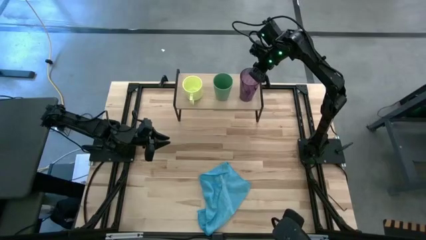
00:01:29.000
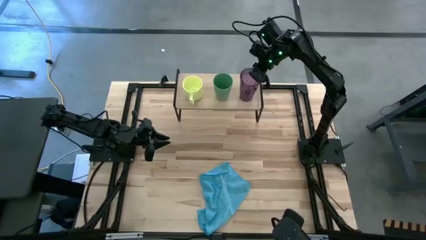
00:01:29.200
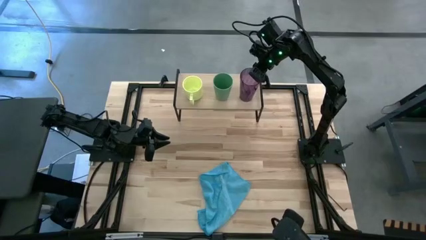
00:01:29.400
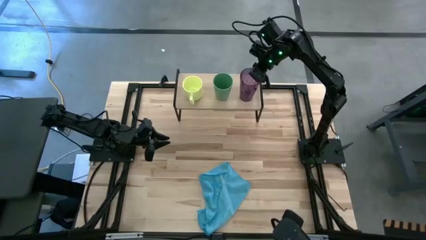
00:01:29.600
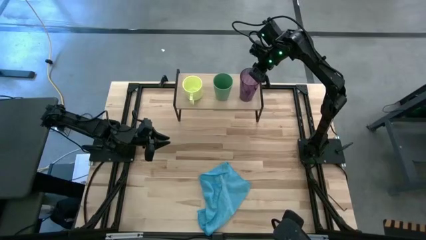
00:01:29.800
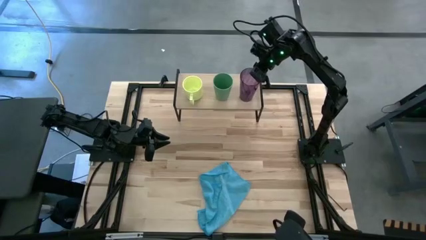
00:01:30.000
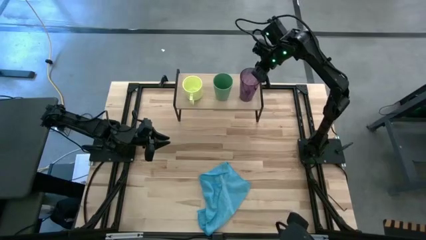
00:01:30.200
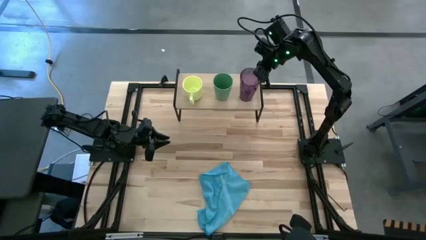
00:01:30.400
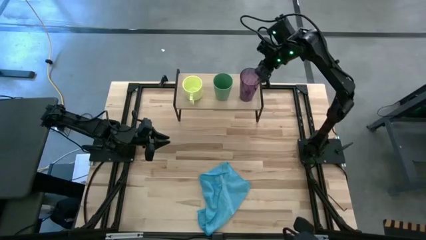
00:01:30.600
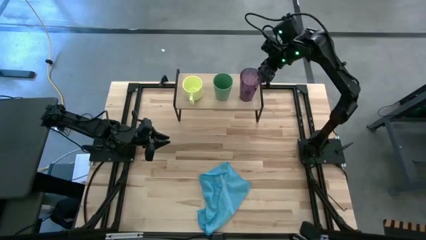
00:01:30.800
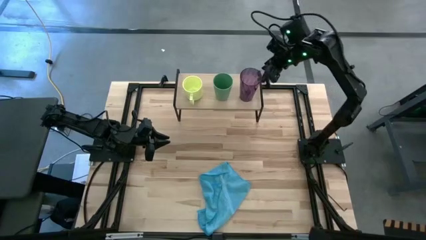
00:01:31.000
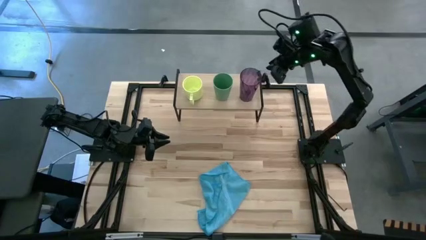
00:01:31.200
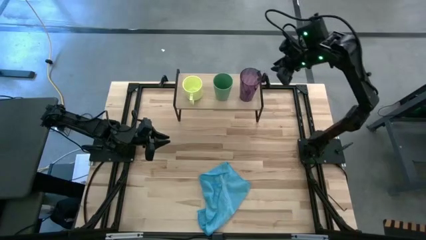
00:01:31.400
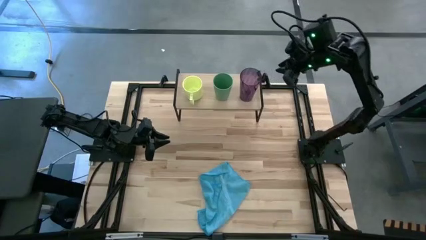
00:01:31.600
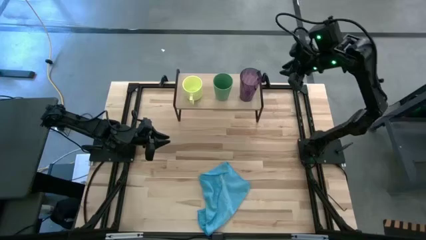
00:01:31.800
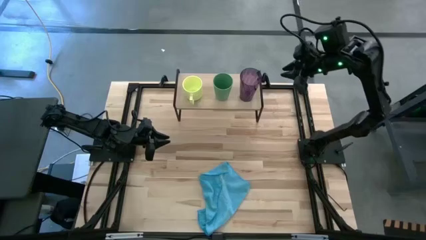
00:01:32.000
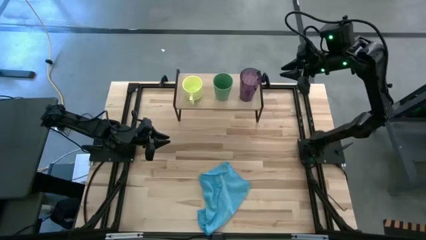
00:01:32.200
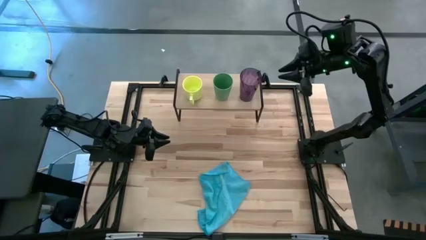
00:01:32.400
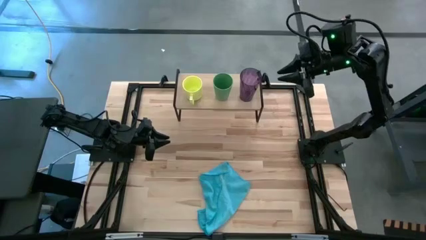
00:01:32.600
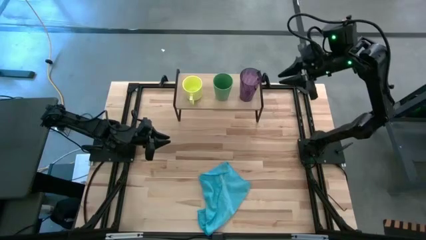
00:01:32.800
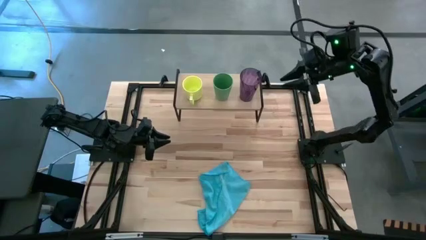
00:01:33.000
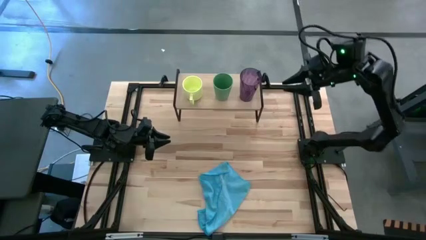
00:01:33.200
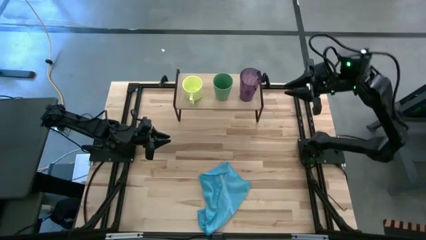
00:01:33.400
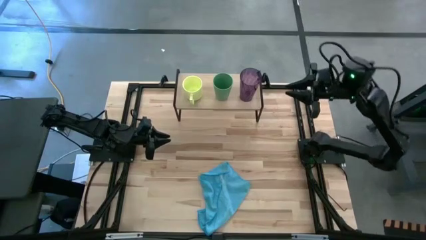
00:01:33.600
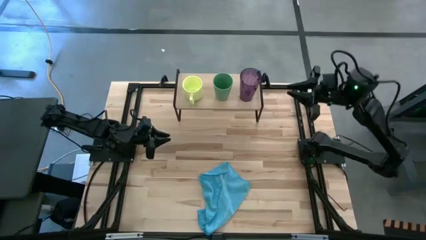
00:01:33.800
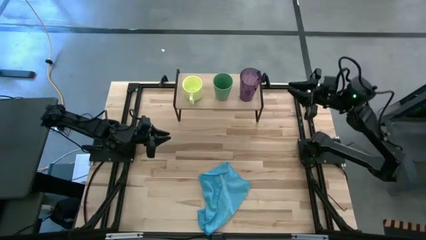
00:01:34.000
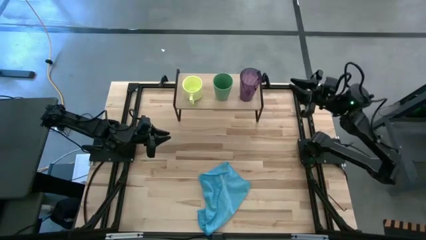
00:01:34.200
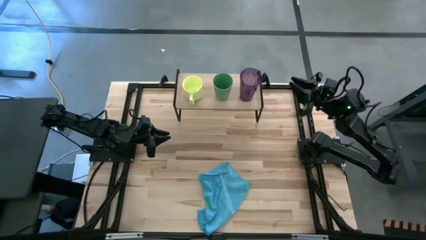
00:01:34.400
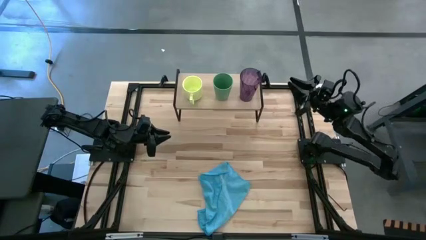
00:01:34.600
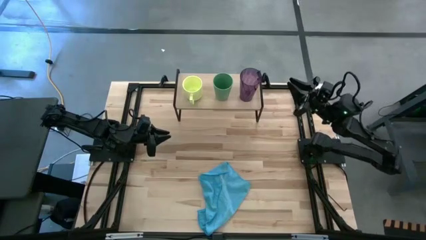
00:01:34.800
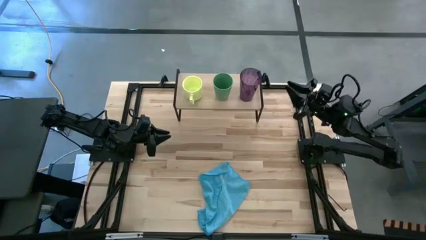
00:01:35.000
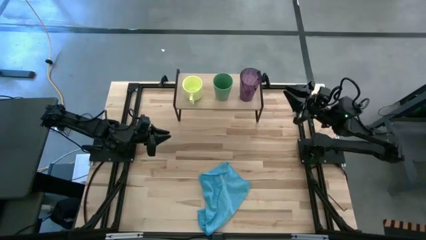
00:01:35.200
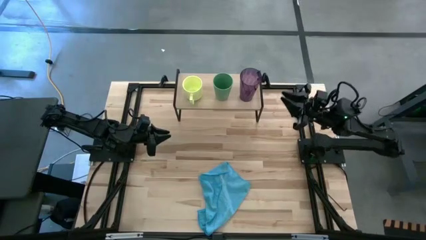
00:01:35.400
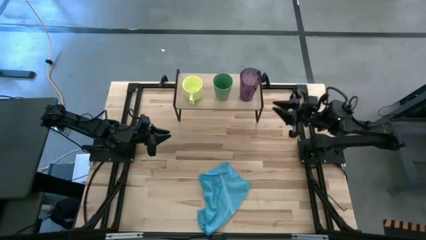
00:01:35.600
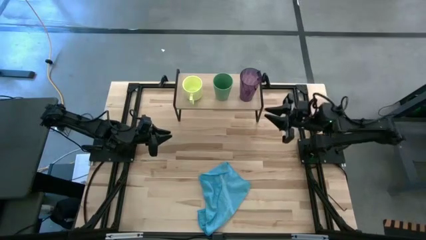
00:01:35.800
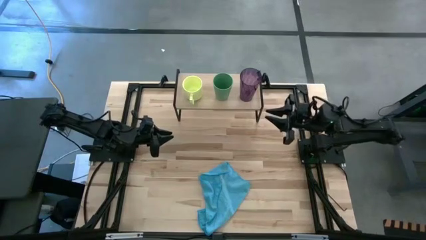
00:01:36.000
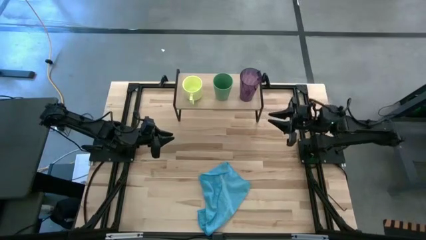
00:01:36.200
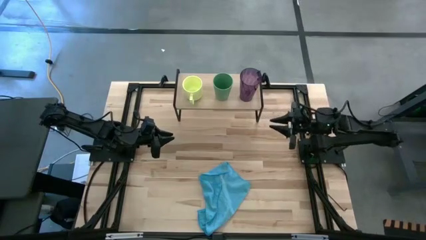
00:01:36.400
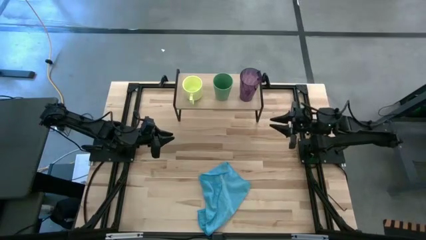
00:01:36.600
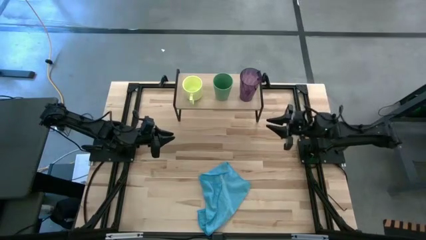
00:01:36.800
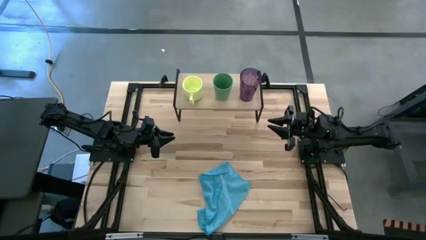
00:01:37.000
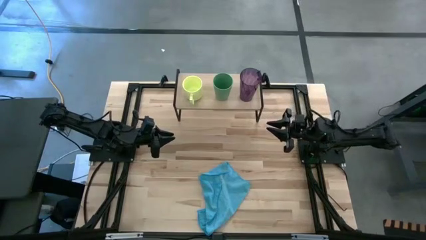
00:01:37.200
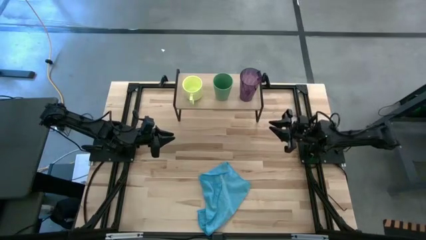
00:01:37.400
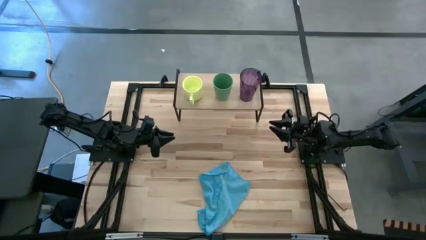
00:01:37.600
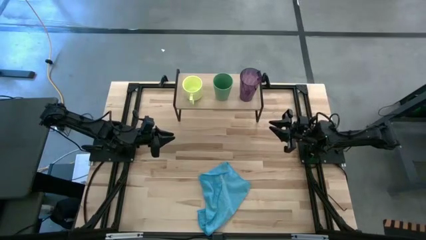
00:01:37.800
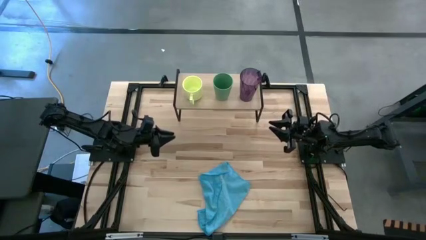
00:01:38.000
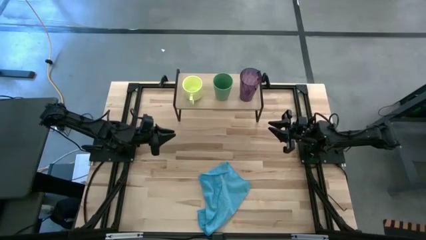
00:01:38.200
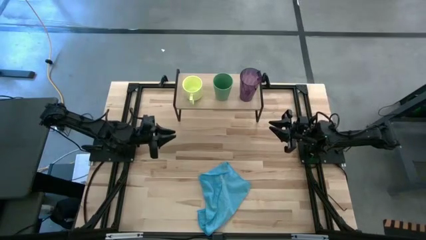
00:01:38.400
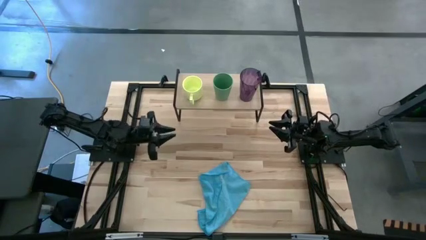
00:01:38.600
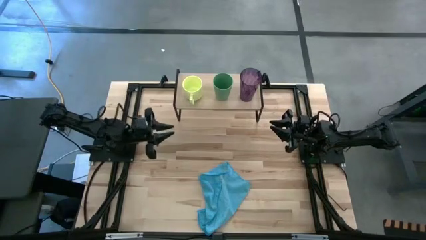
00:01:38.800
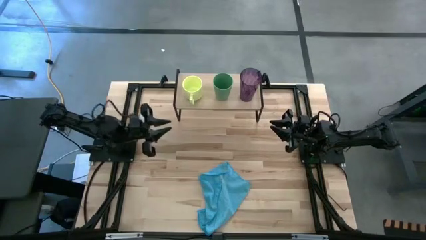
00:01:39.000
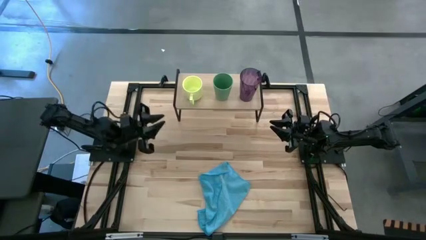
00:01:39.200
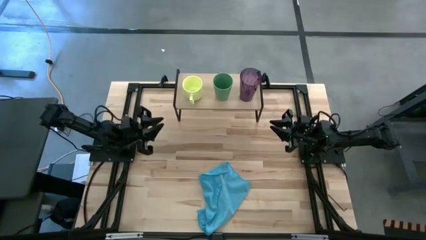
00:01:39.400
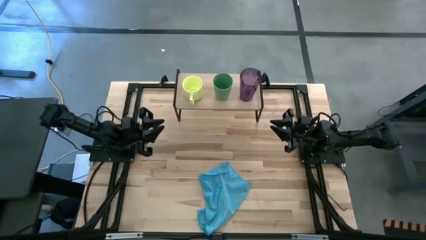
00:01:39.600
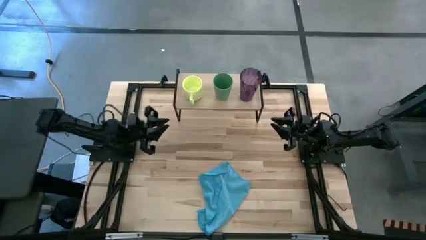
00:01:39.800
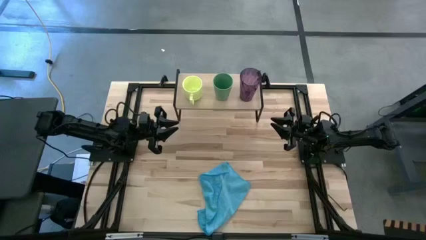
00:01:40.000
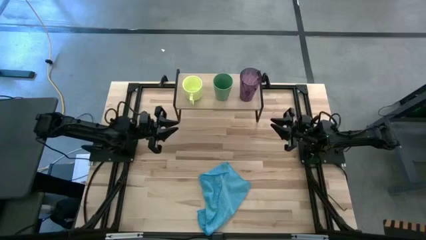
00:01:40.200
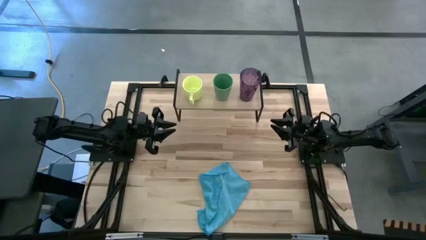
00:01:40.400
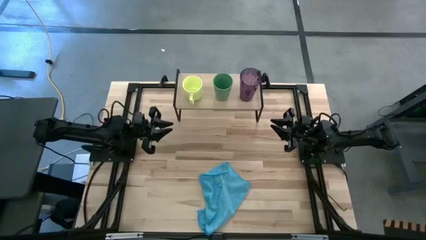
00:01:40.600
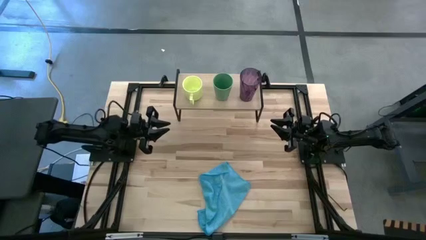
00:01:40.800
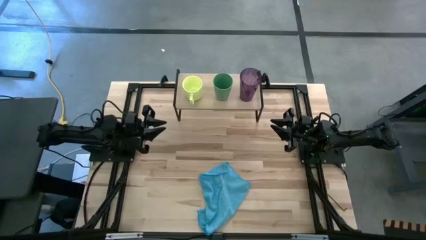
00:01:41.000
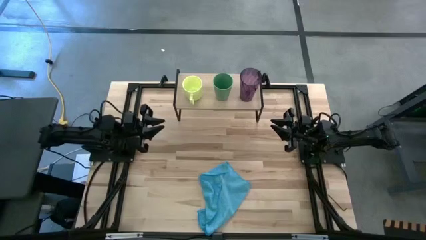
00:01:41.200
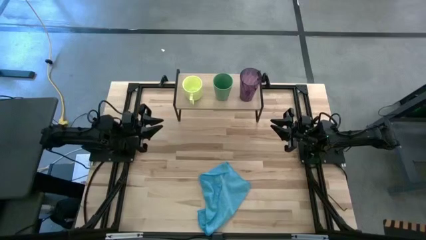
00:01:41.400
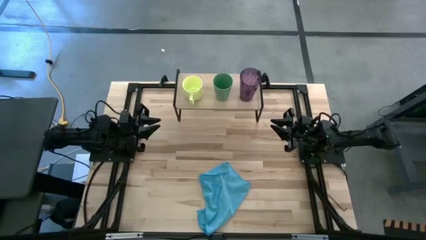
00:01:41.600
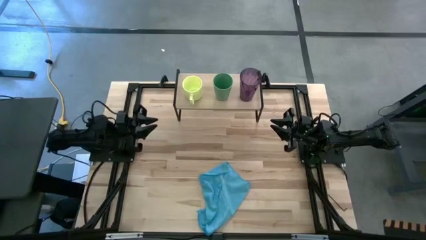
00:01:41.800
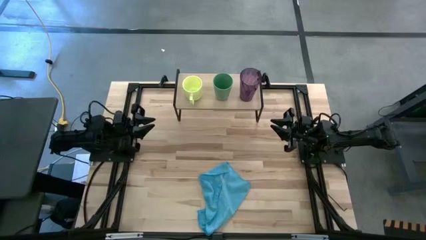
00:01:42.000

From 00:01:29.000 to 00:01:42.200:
Task: Stack small to large cups/mugs on shelf
Return to Home Position
